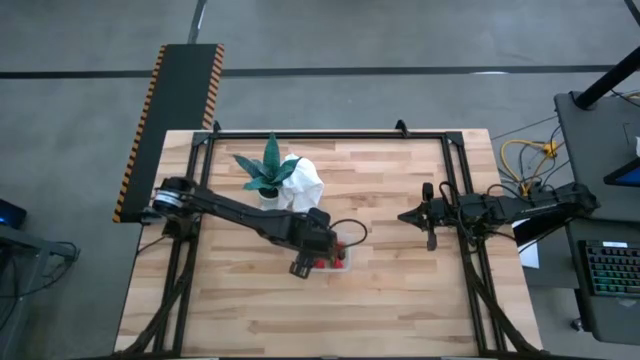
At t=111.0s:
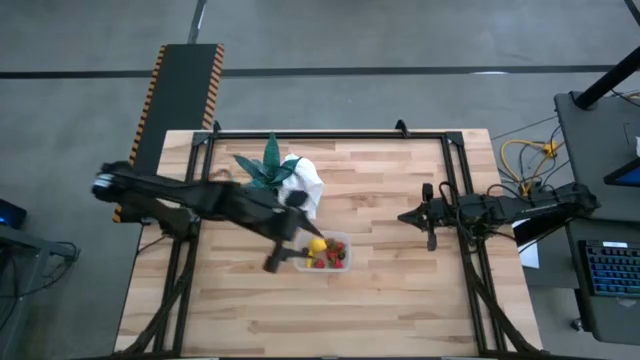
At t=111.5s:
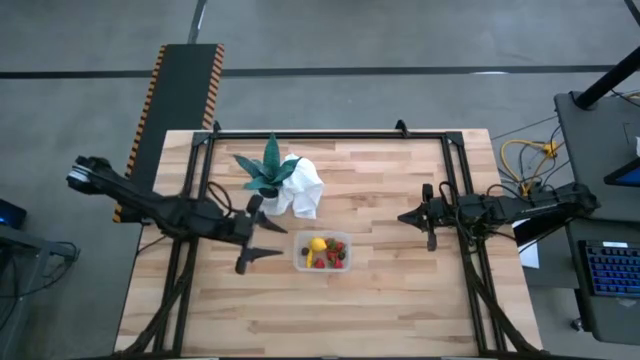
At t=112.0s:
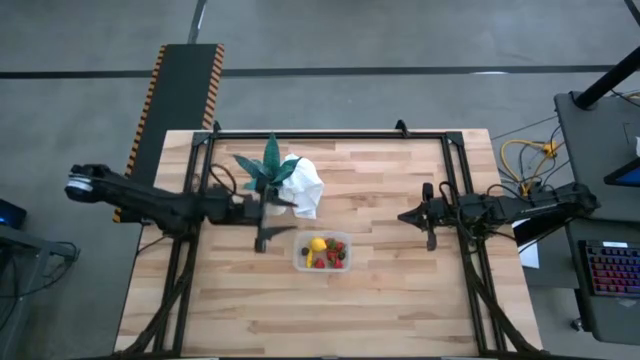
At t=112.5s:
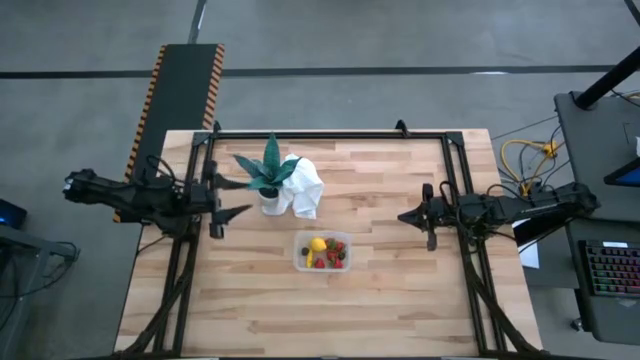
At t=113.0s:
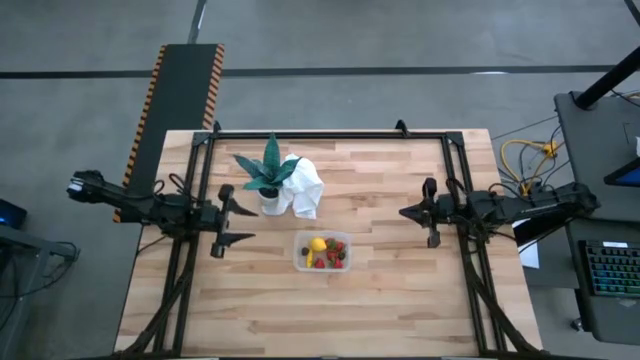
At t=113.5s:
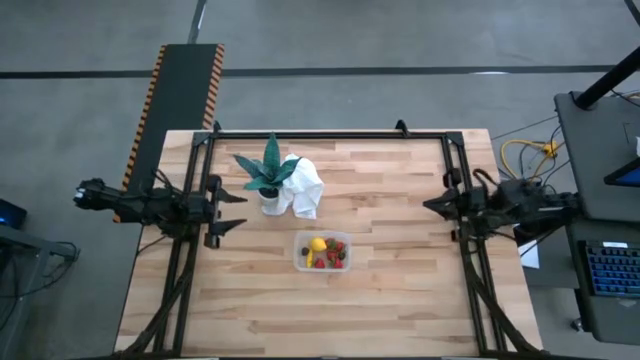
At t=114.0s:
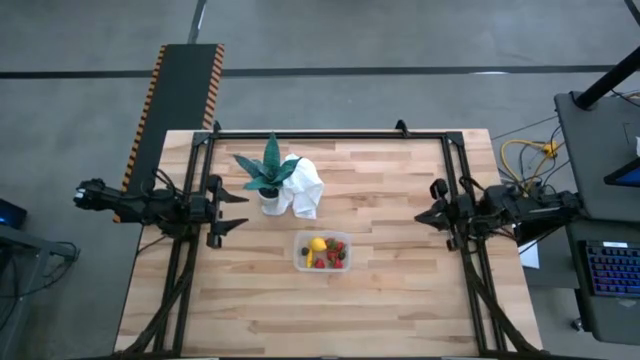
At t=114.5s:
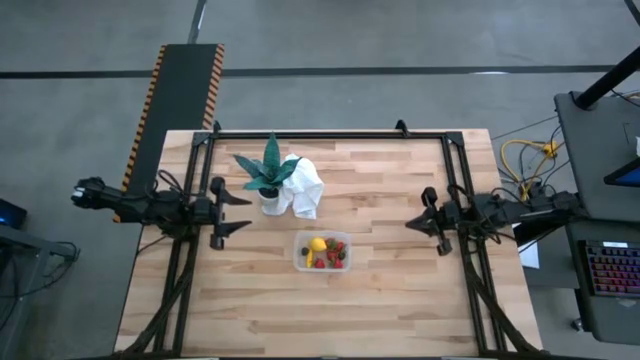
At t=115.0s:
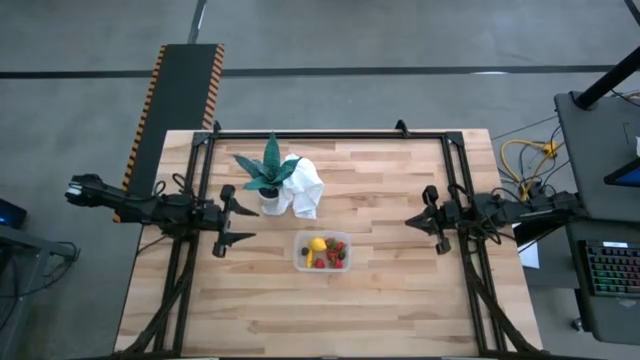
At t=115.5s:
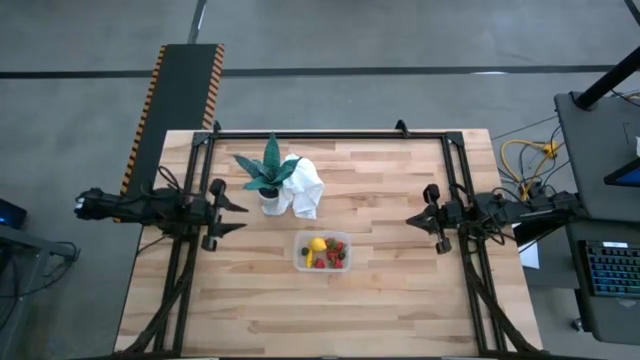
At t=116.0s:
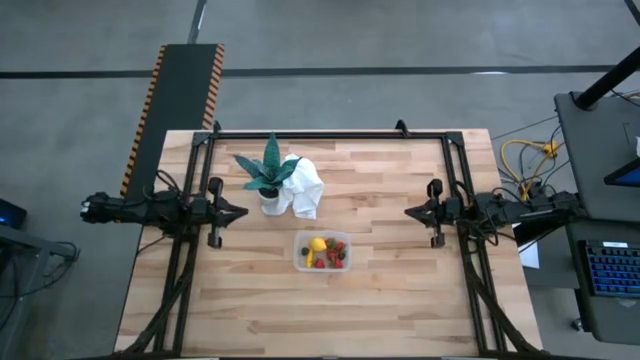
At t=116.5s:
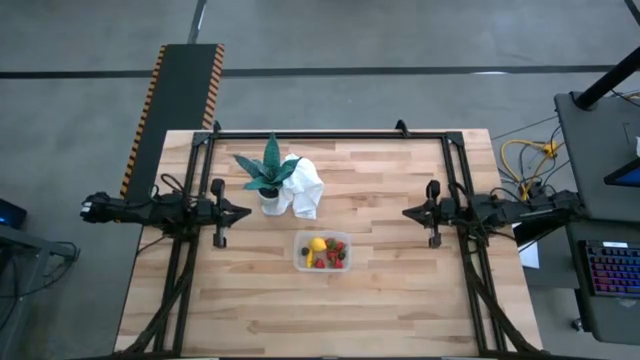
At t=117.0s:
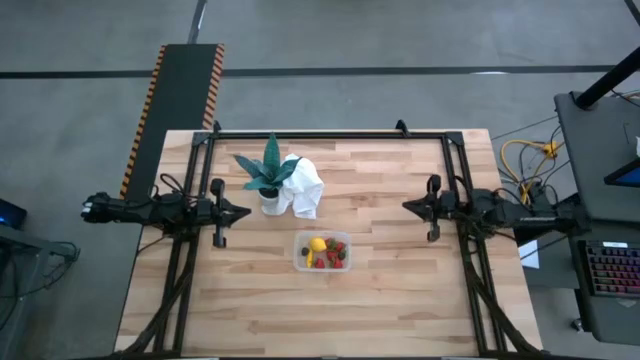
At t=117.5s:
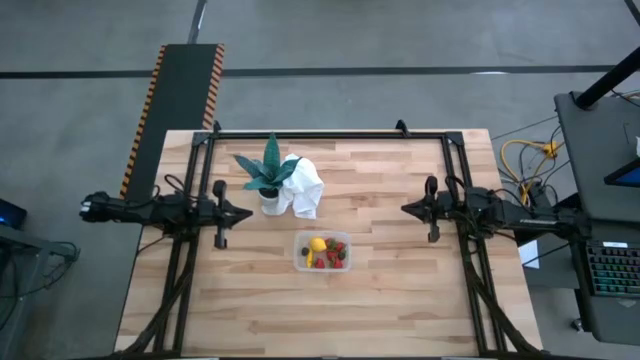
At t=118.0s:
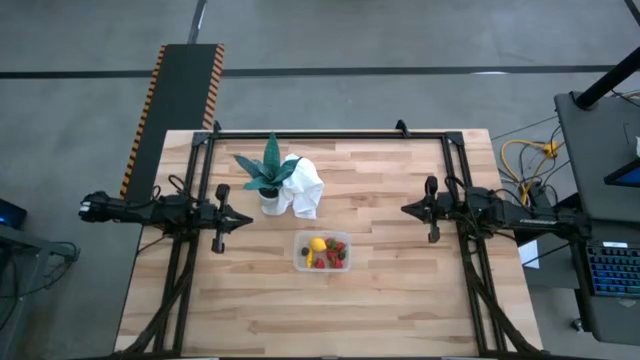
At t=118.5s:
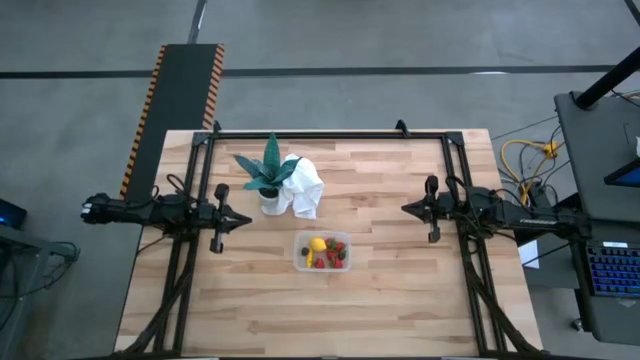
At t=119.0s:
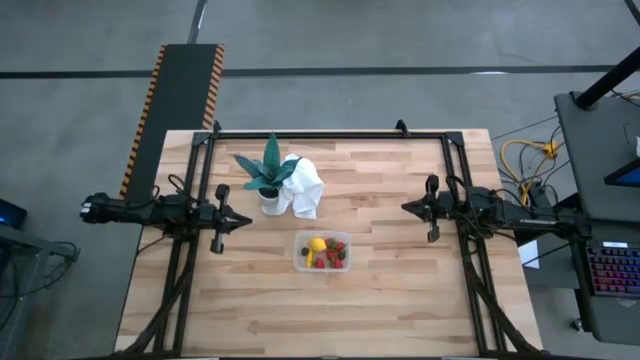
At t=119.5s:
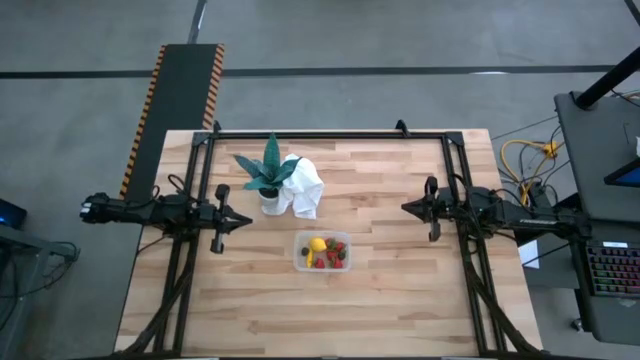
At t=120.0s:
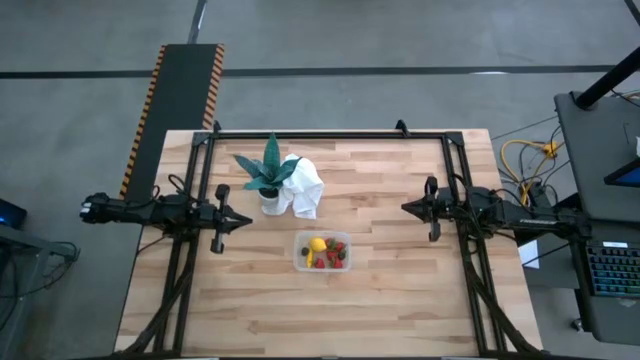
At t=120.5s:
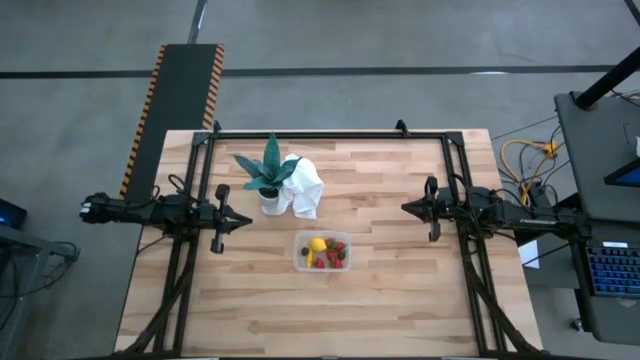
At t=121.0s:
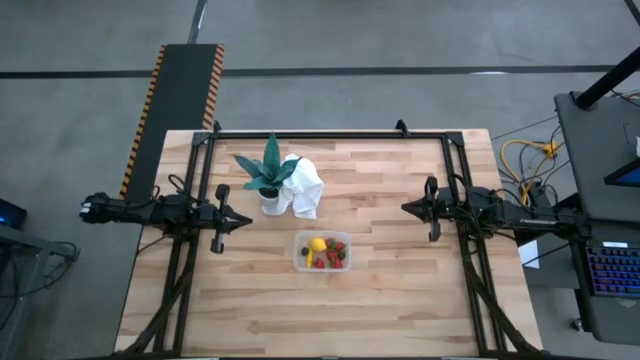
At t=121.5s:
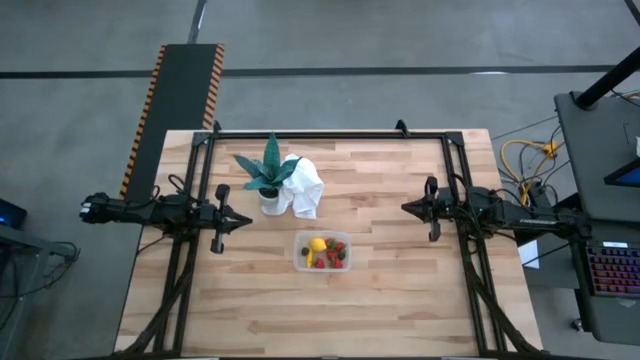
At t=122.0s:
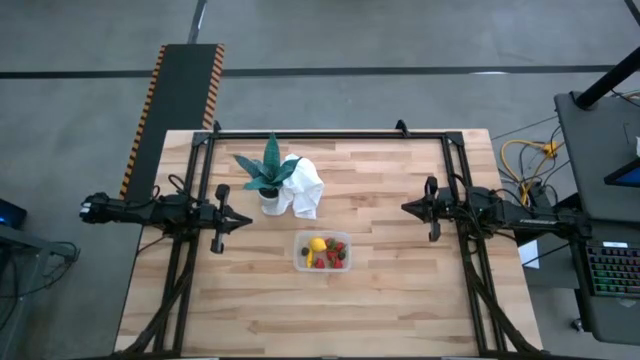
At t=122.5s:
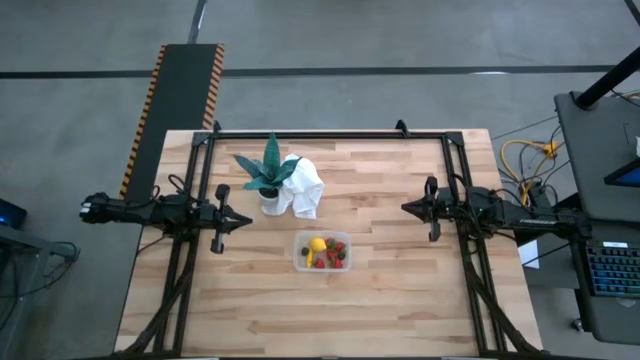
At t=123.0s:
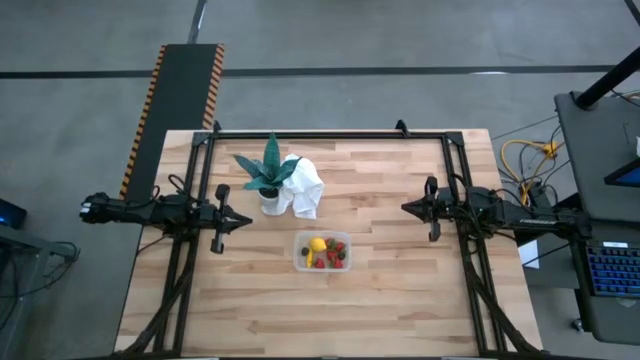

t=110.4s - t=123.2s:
Task: Pick and placing Produce into tupperware
Return to Home Position

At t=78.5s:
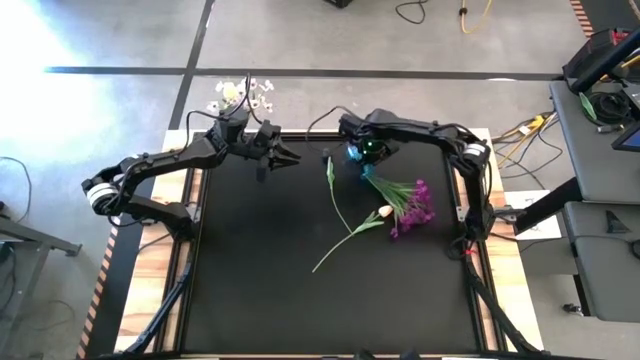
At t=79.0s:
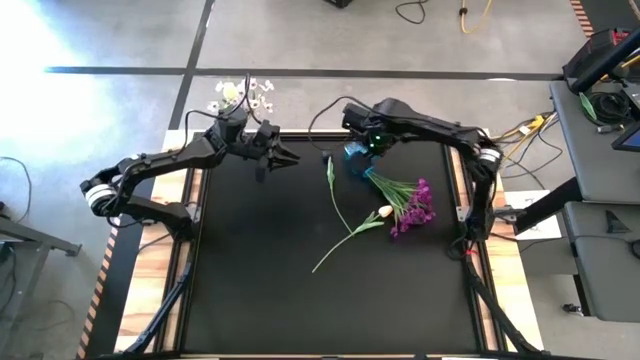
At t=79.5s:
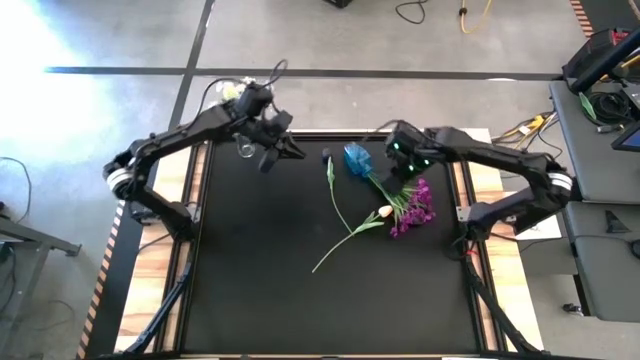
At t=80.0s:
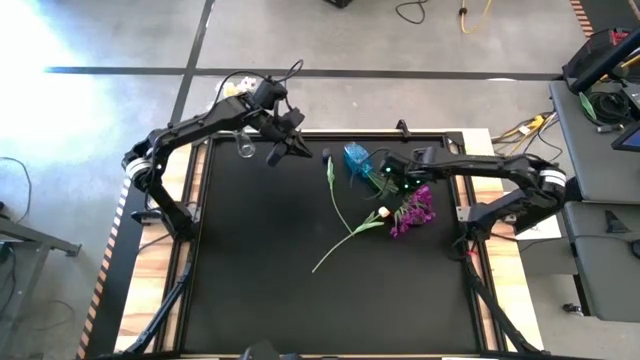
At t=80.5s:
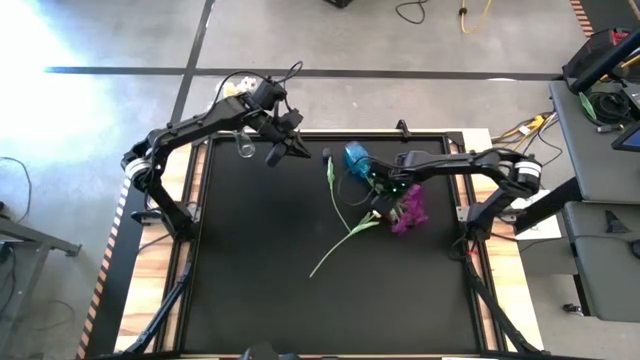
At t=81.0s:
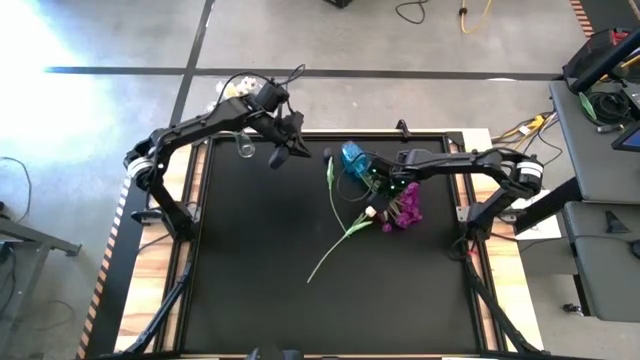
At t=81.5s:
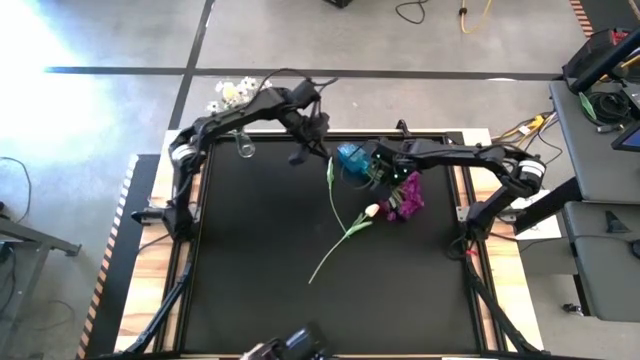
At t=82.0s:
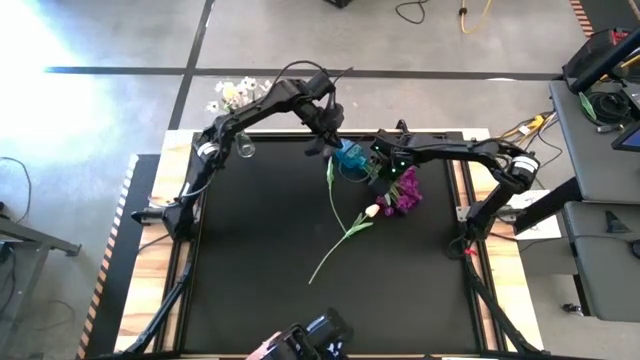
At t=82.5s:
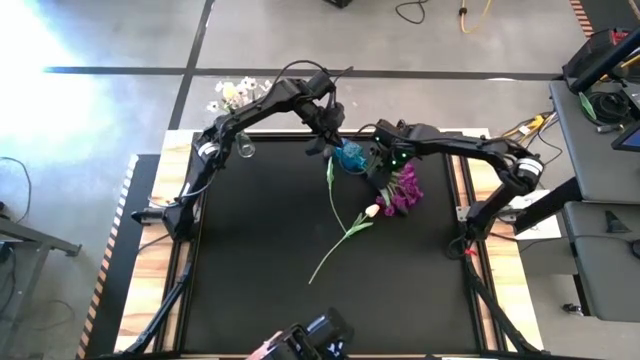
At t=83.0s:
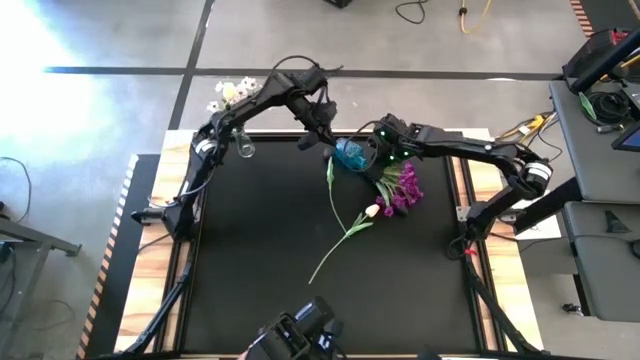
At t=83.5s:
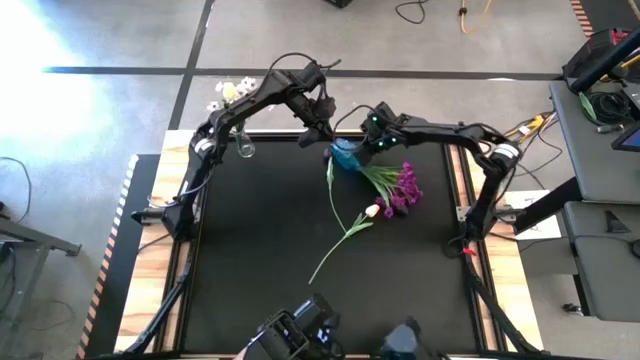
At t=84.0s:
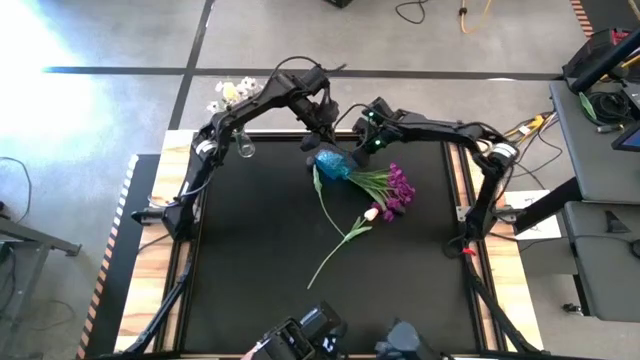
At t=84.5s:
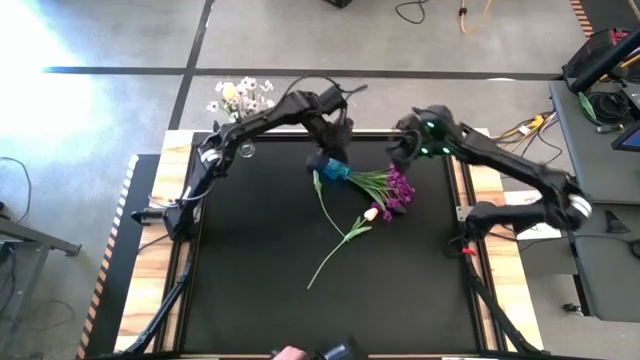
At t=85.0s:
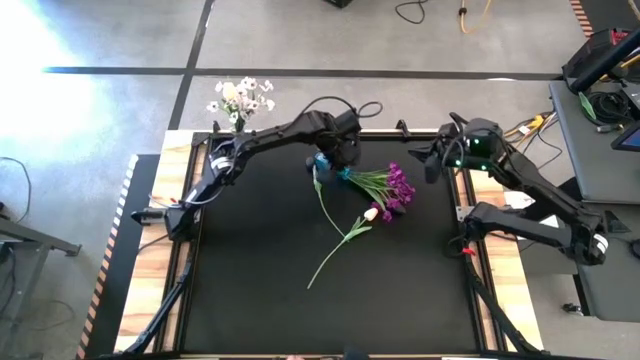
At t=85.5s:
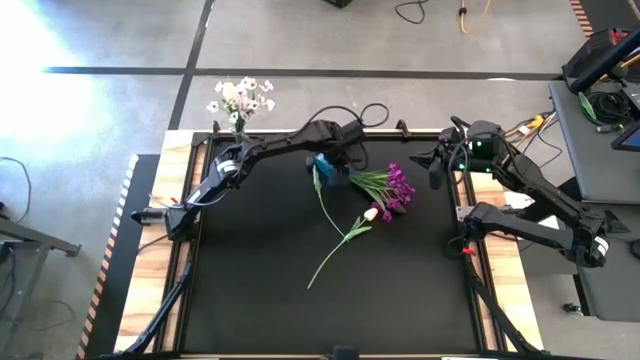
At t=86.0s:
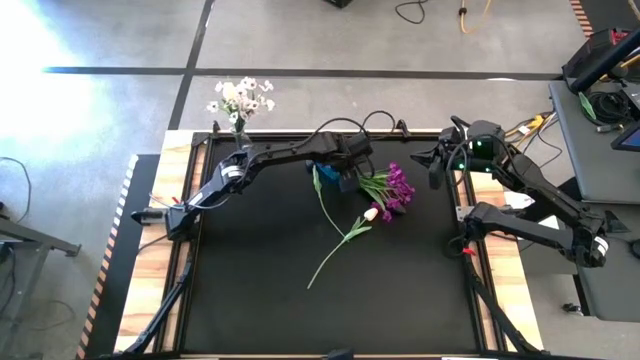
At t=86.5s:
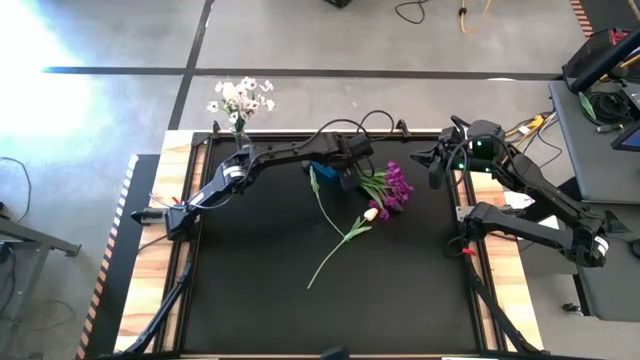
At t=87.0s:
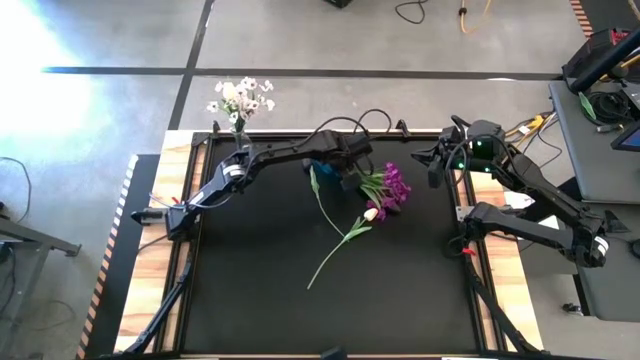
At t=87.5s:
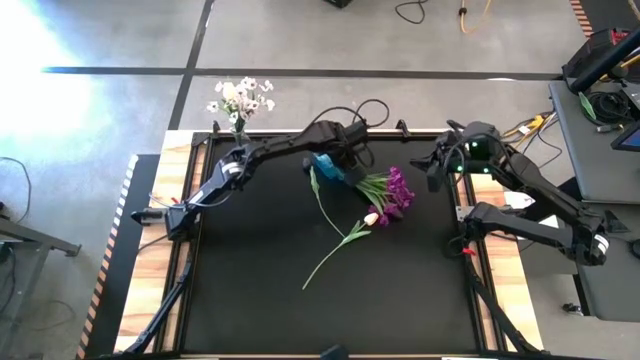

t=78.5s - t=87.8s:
Task: Sort flowers into vase by color
Remove the violet flowers from the blue vase
